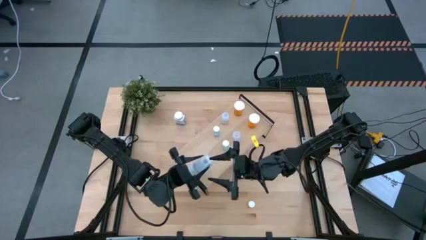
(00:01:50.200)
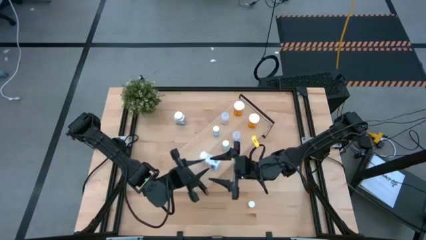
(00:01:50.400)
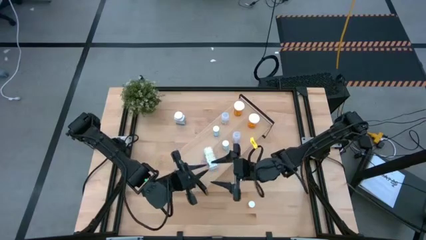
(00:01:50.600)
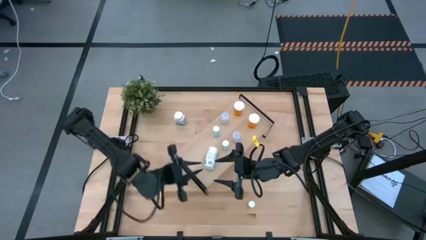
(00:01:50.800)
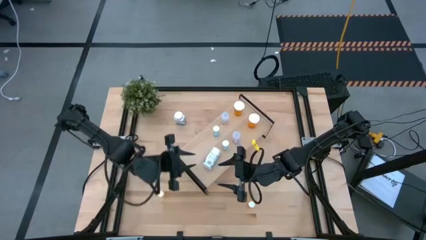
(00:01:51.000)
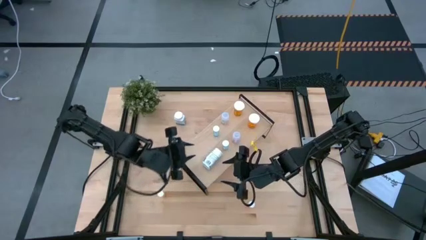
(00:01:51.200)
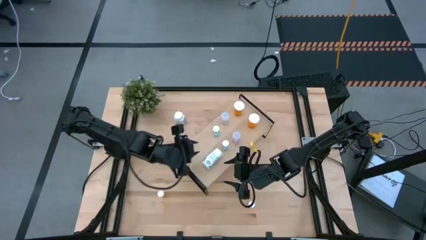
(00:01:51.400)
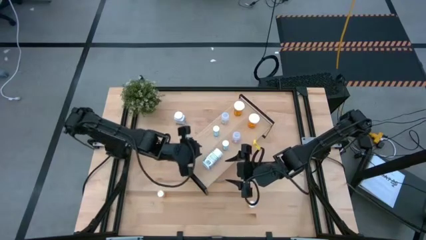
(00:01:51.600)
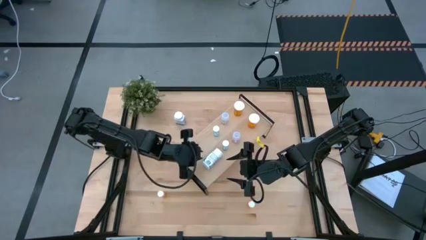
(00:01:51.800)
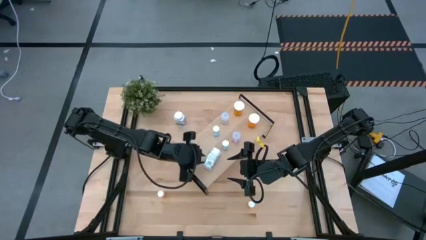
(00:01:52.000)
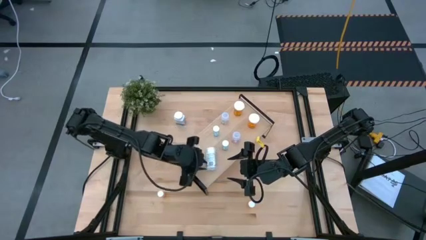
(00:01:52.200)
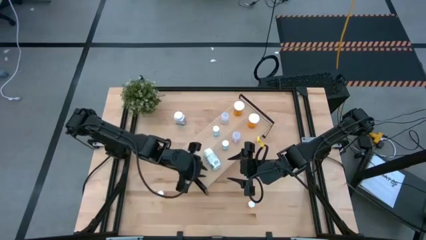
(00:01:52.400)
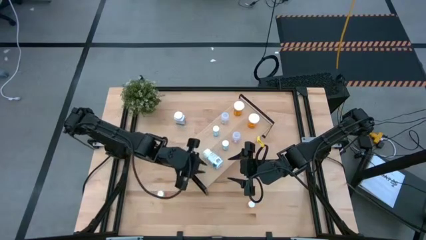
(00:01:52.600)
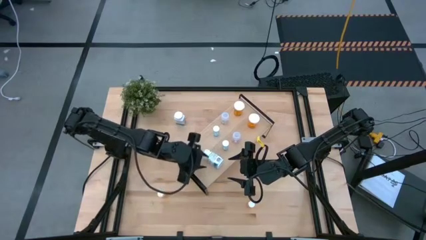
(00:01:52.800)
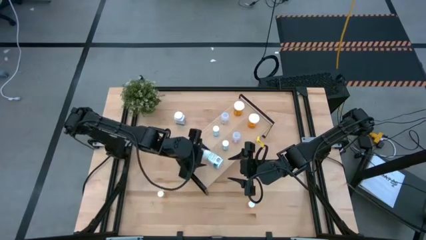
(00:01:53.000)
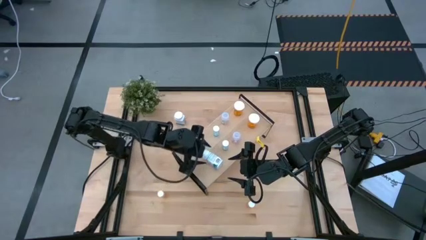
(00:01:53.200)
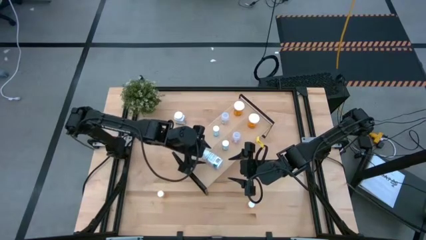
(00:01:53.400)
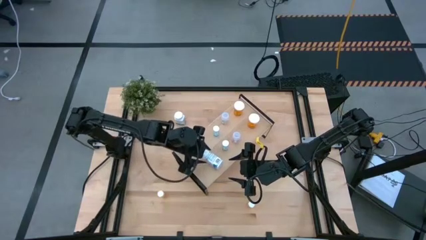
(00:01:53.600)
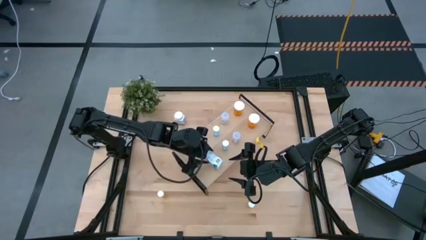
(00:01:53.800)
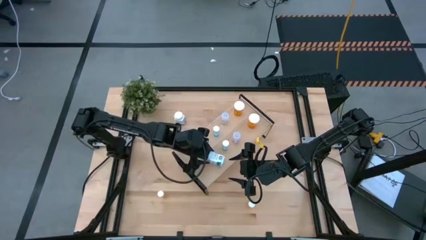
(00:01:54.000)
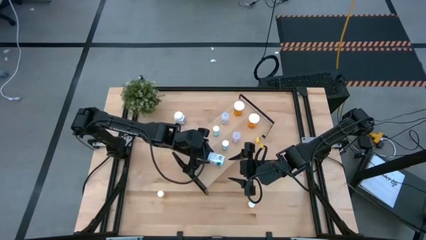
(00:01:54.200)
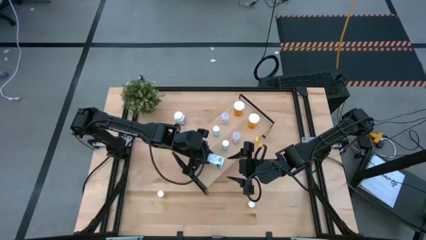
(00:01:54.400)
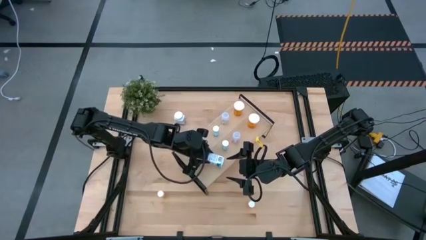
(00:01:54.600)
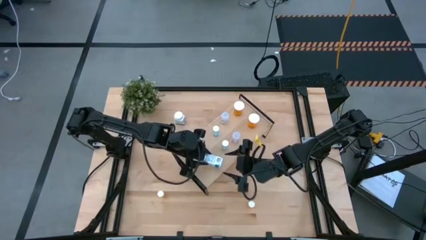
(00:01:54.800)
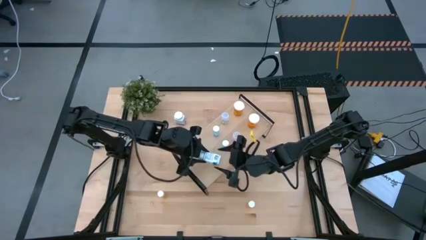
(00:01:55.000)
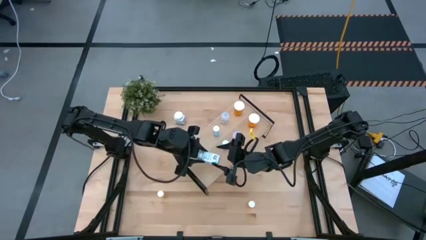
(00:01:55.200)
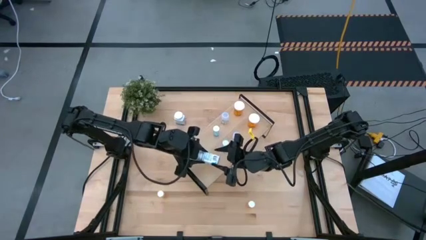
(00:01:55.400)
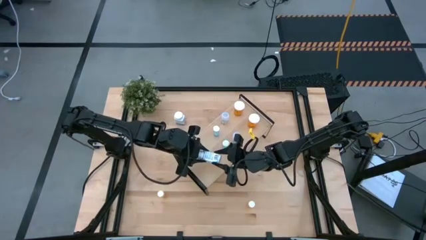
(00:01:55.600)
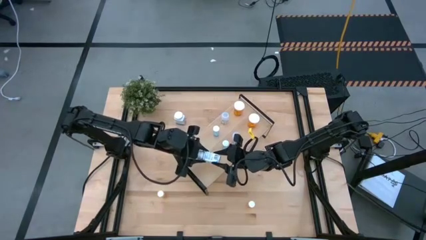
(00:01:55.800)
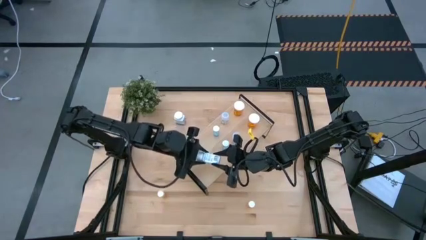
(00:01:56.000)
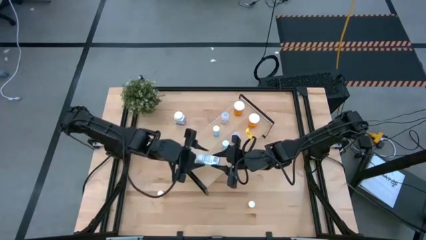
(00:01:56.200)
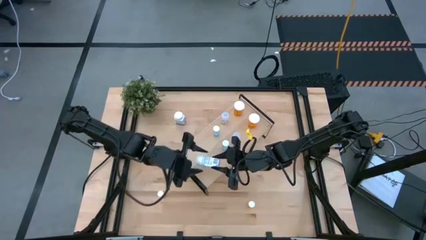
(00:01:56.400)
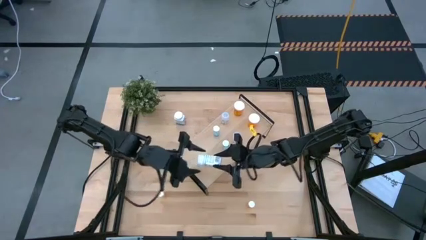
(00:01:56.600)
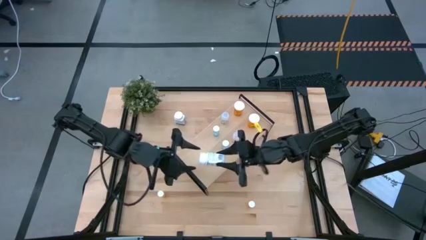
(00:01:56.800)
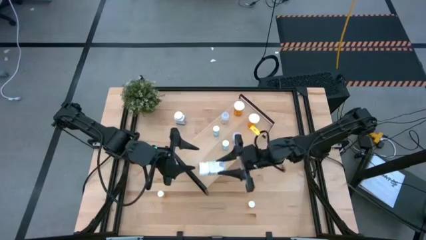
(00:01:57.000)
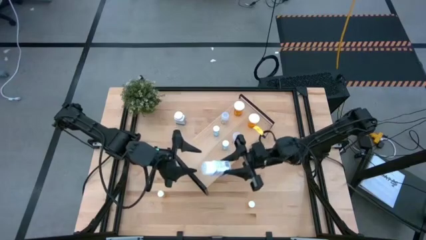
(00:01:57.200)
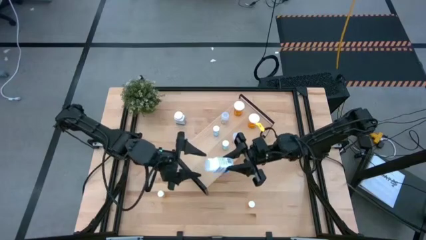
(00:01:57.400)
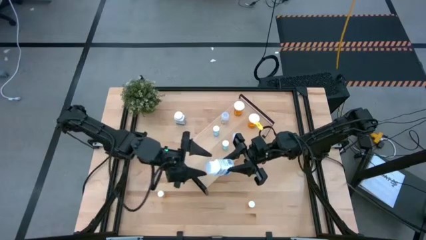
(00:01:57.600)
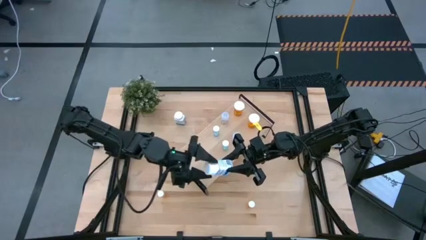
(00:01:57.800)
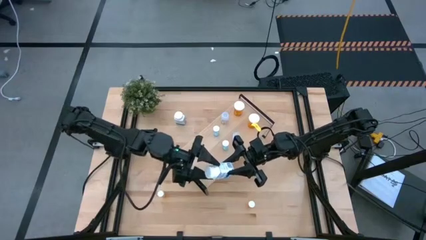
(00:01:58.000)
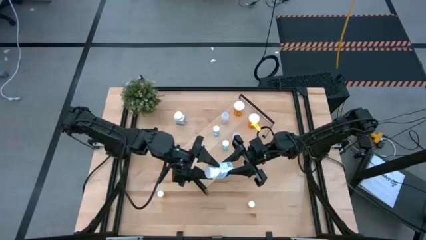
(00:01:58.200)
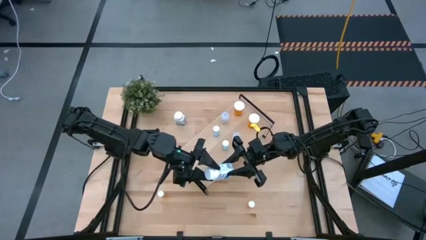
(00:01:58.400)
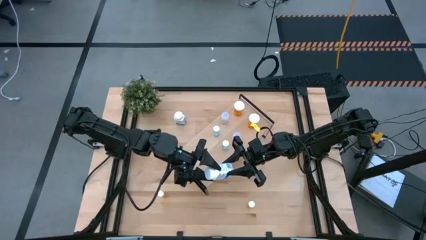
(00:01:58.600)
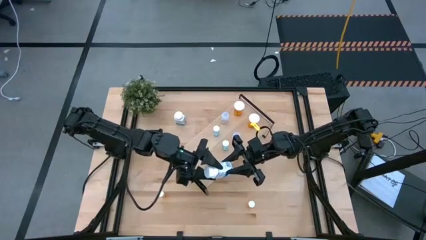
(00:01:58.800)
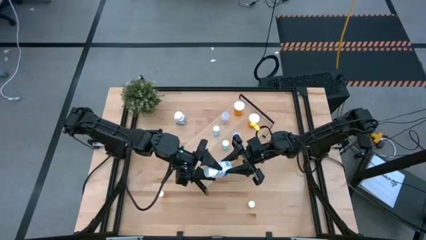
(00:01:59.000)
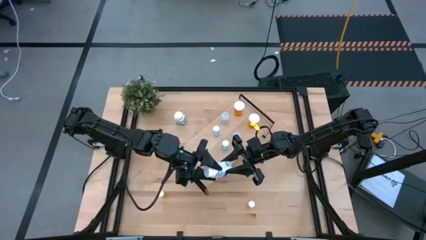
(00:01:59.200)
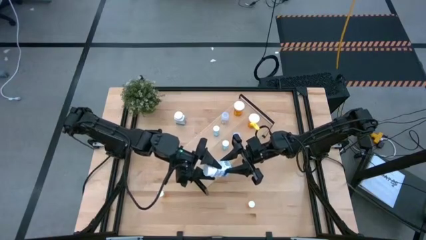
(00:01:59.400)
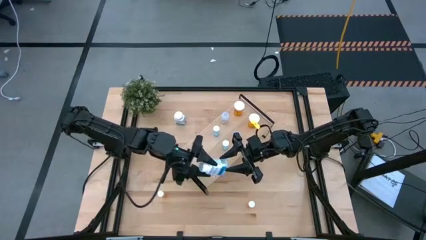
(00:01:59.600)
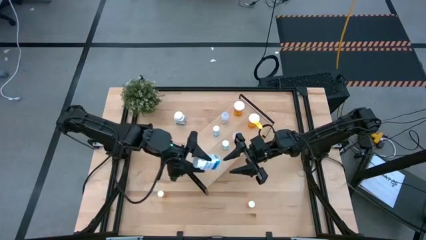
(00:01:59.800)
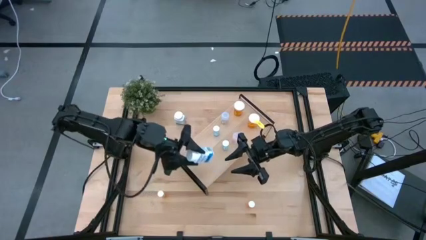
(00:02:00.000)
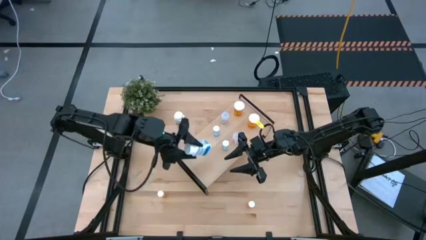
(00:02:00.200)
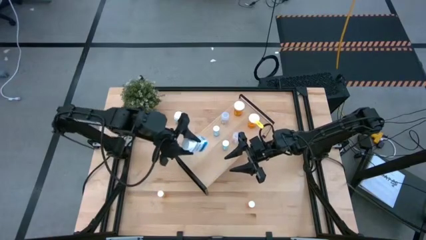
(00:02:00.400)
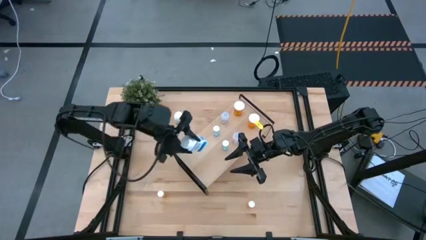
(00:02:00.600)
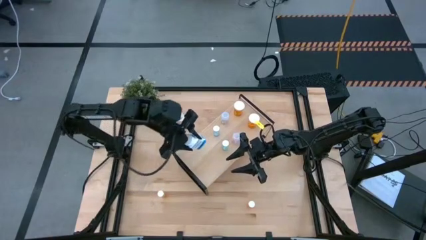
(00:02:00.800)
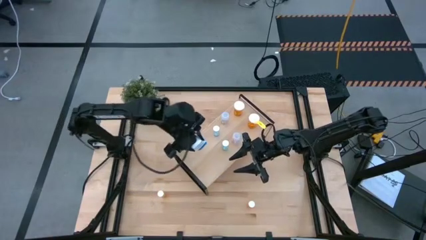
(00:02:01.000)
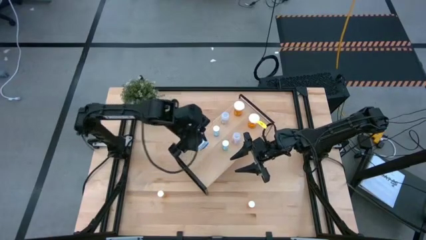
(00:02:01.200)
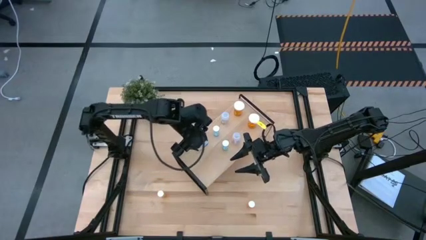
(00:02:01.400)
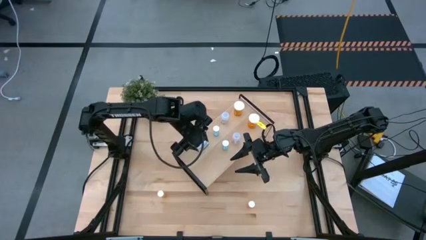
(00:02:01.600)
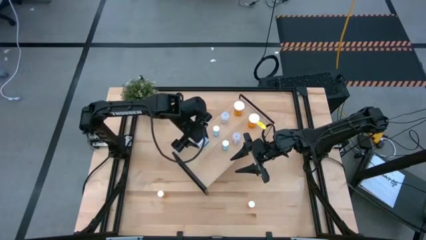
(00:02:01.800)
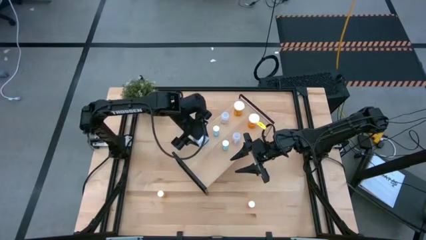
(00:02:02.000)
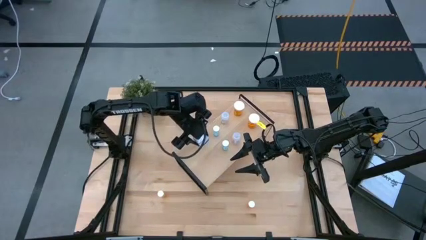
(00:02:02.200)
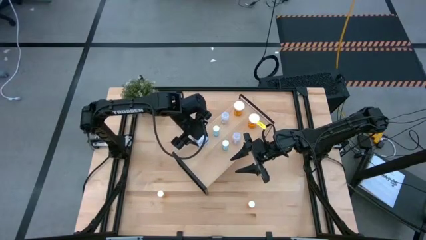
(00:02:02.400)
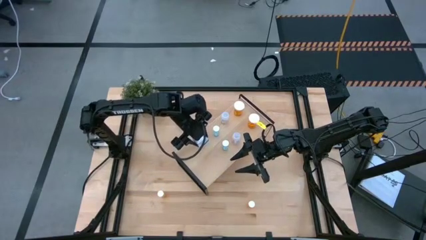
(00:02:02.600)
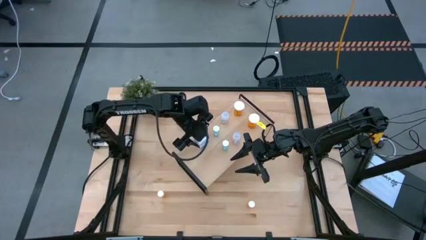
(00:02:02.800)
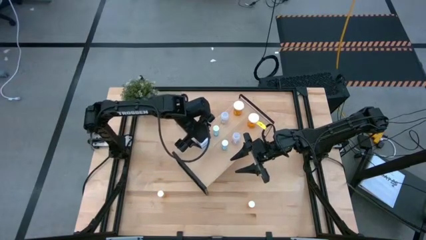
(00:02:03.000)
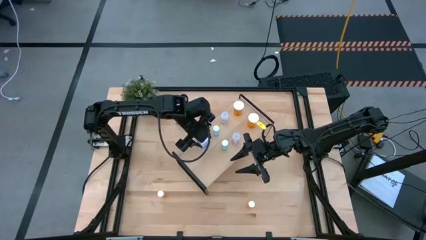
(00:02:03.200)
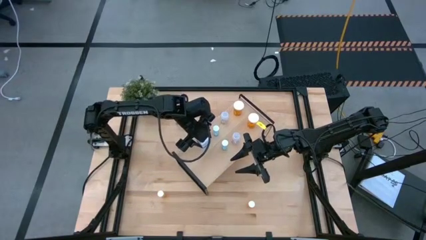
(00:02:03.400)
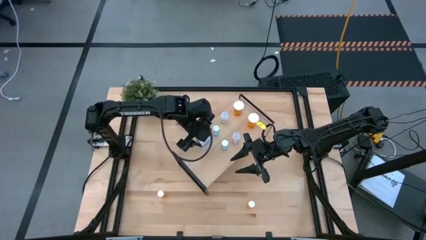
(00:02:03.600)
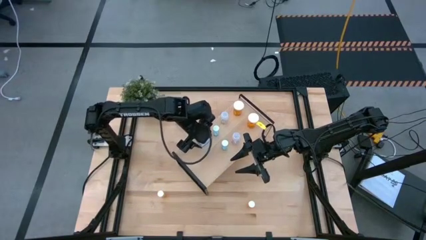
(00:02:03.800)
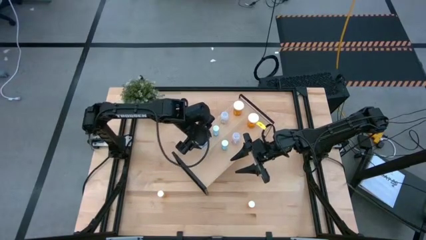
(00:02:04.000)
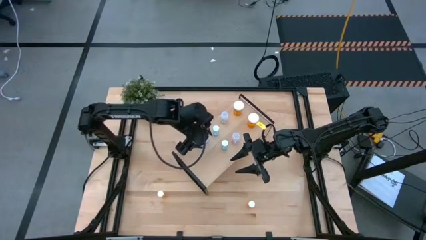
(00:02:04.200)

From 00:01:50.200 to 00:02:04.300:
Task: Pick and place medicine bottles onto shelf by color
Put the bottom white pill bottle on the shelf
